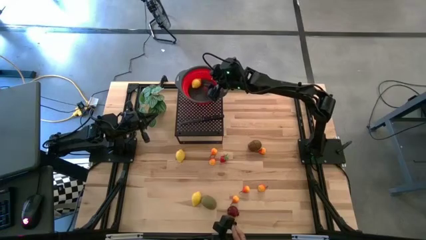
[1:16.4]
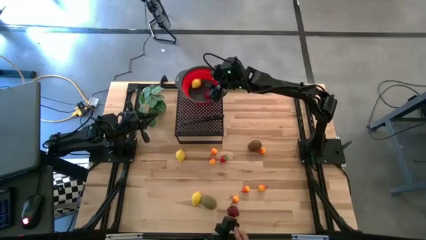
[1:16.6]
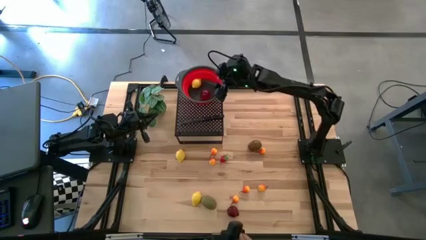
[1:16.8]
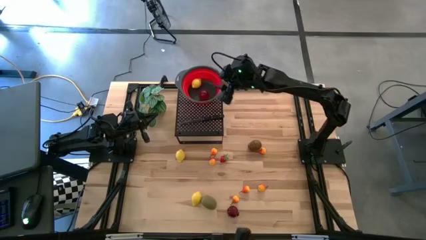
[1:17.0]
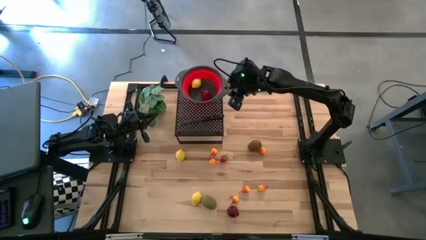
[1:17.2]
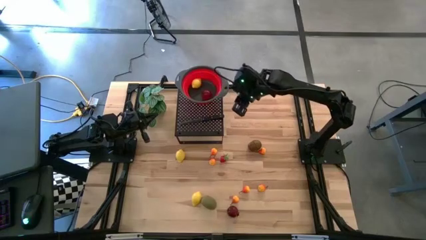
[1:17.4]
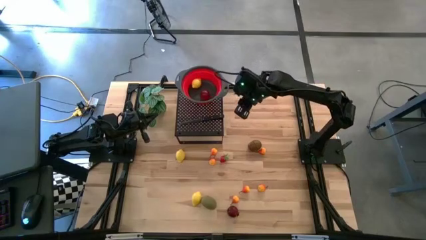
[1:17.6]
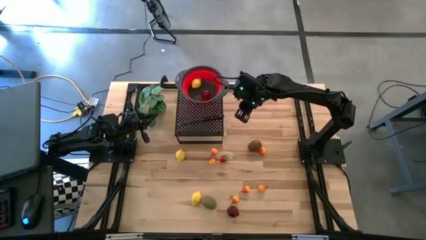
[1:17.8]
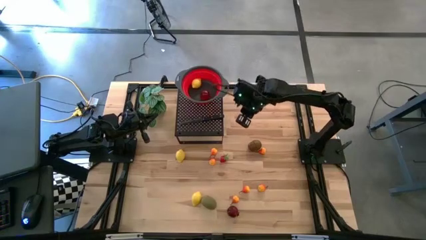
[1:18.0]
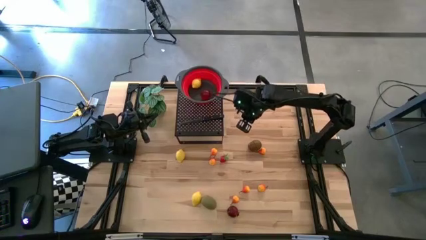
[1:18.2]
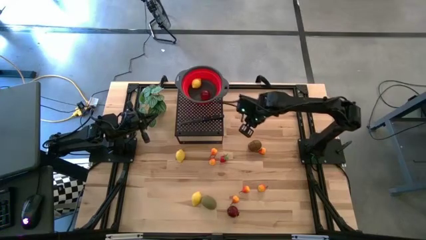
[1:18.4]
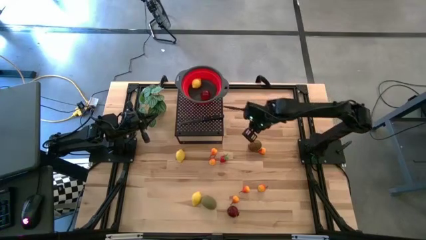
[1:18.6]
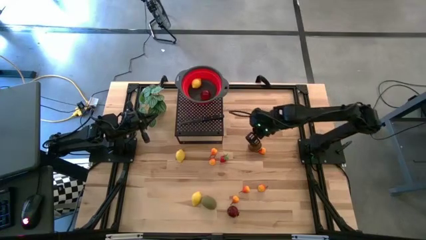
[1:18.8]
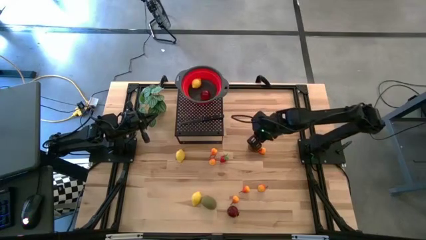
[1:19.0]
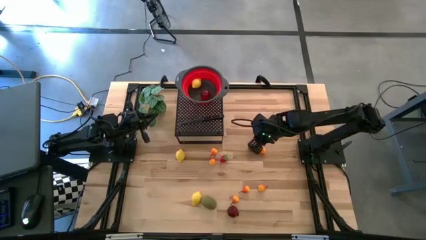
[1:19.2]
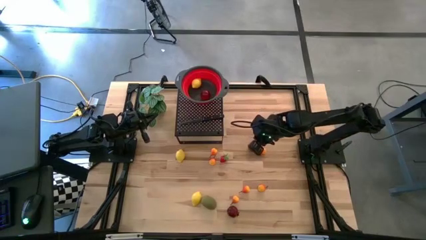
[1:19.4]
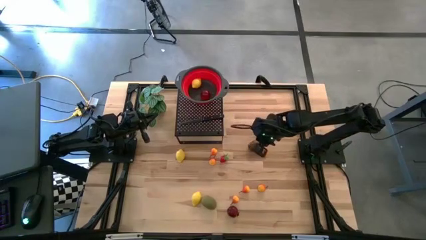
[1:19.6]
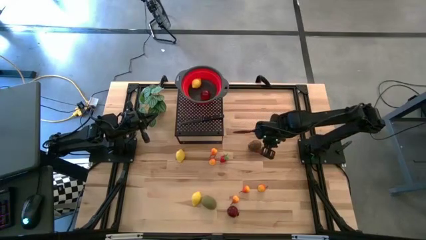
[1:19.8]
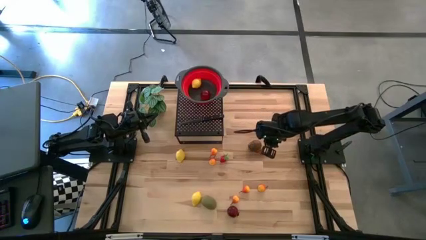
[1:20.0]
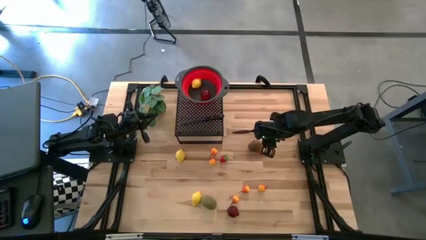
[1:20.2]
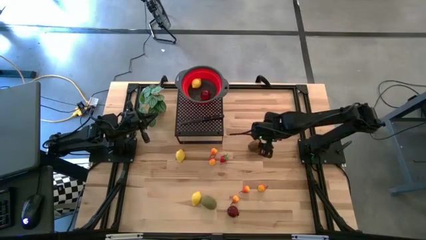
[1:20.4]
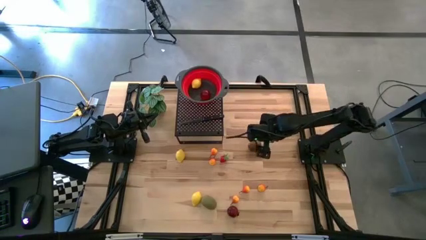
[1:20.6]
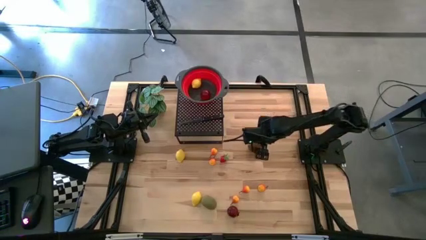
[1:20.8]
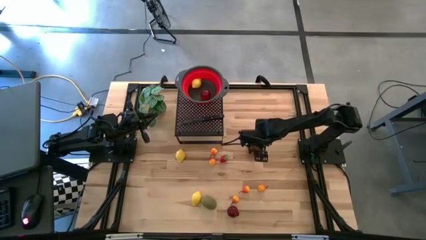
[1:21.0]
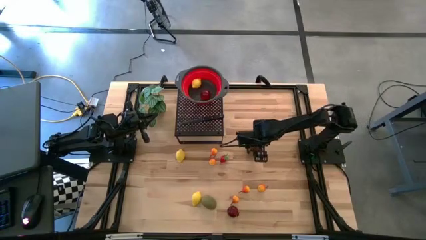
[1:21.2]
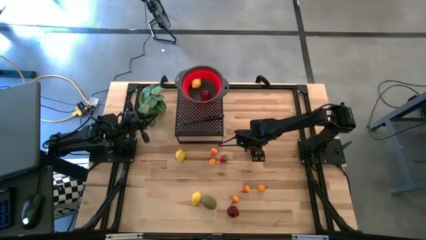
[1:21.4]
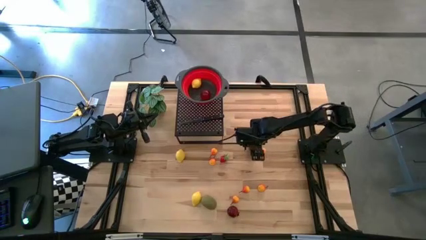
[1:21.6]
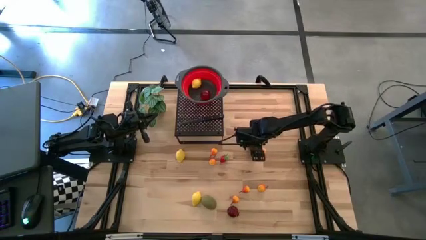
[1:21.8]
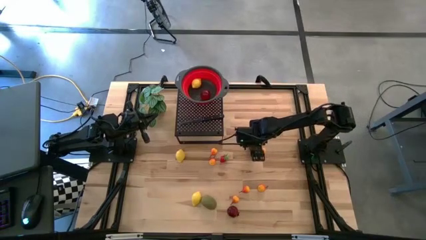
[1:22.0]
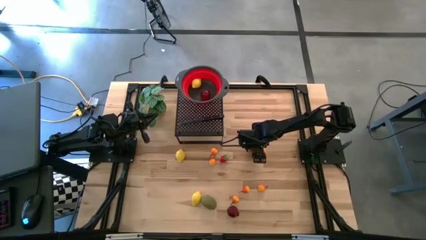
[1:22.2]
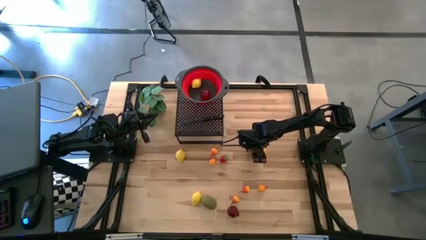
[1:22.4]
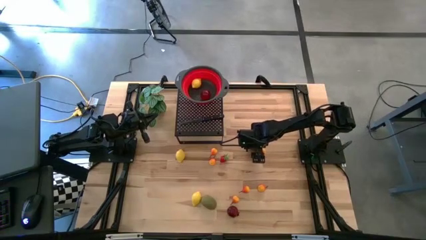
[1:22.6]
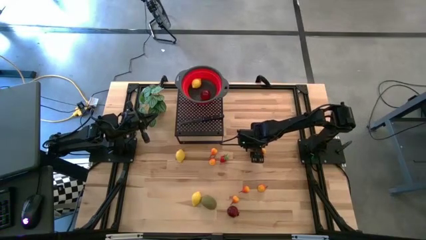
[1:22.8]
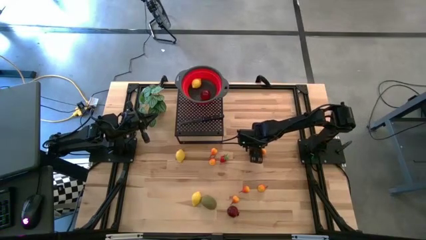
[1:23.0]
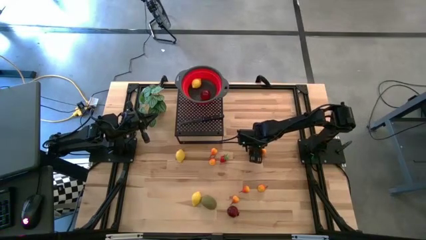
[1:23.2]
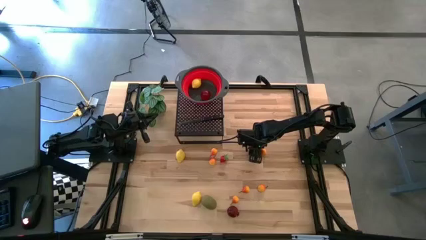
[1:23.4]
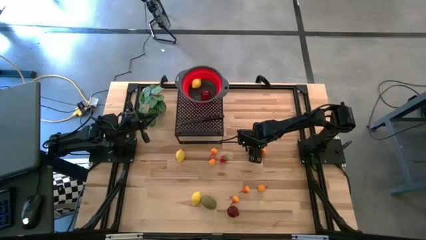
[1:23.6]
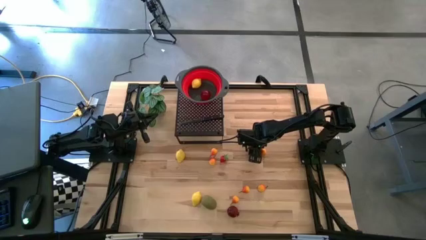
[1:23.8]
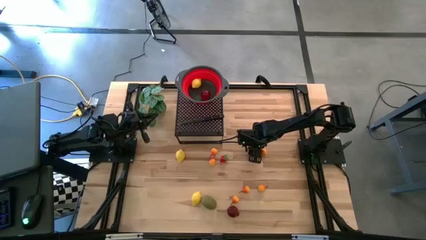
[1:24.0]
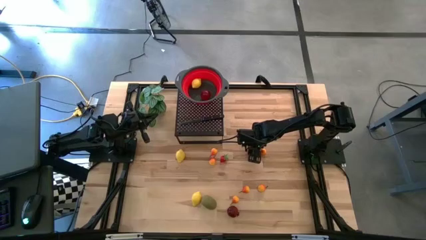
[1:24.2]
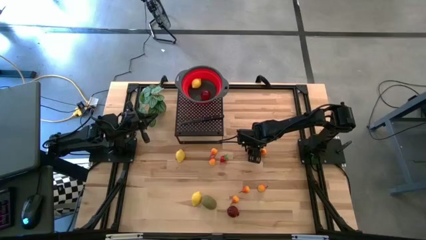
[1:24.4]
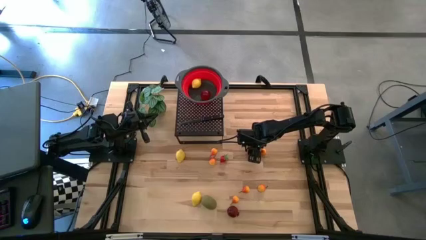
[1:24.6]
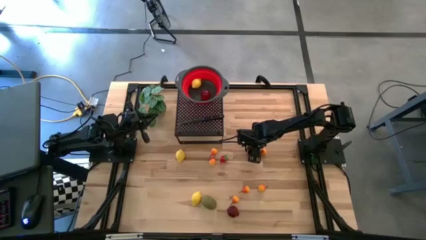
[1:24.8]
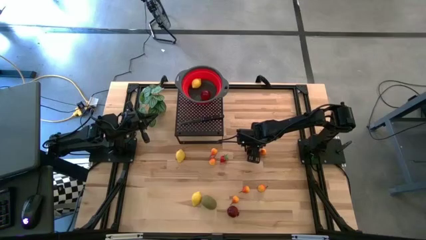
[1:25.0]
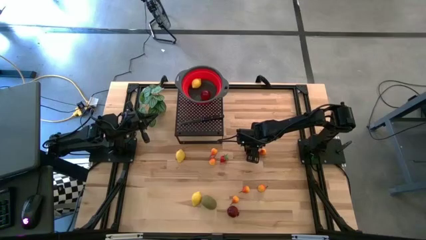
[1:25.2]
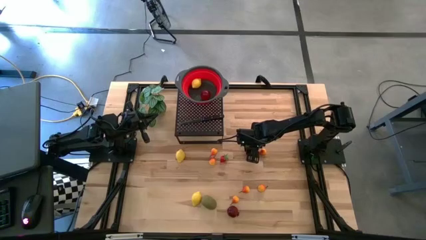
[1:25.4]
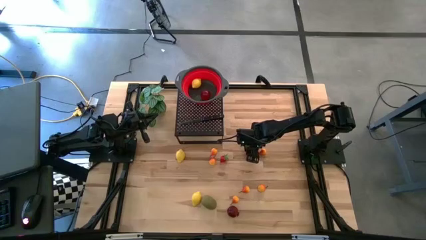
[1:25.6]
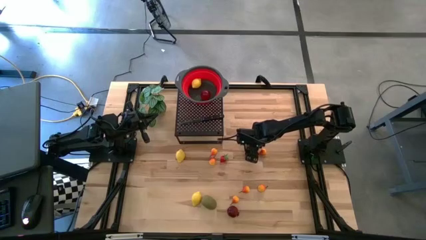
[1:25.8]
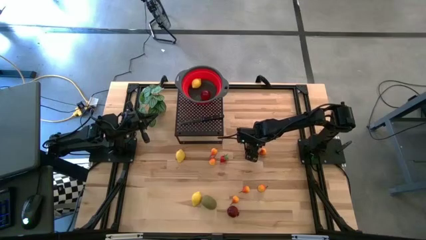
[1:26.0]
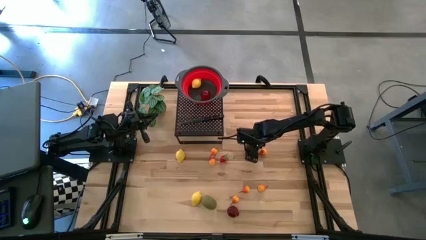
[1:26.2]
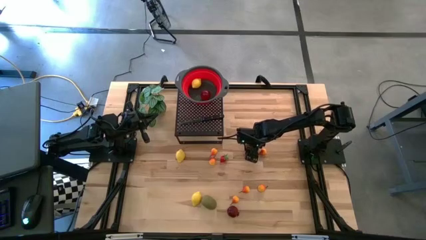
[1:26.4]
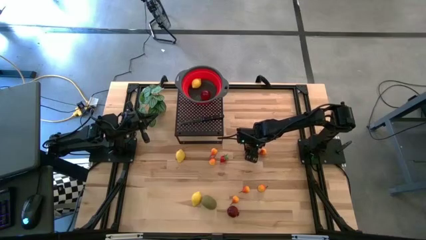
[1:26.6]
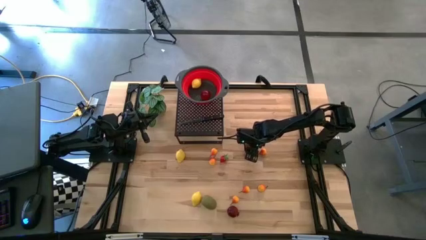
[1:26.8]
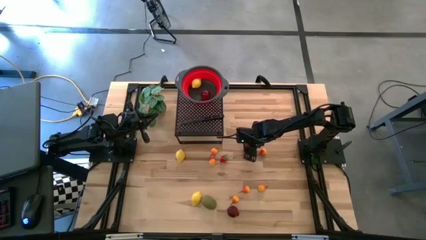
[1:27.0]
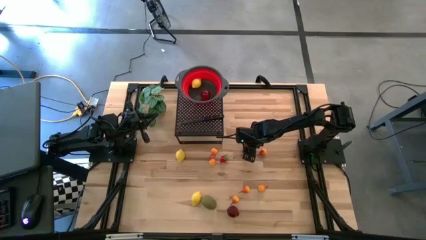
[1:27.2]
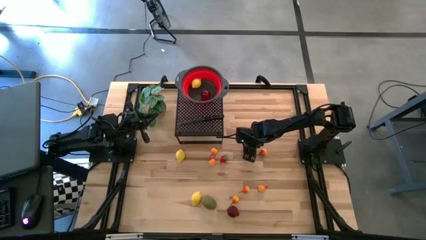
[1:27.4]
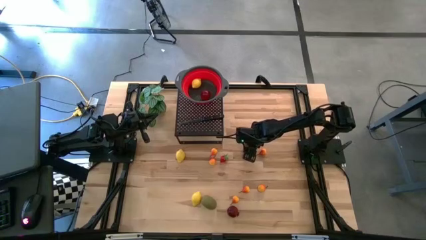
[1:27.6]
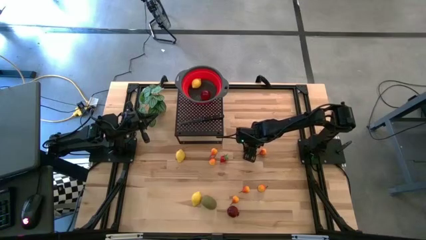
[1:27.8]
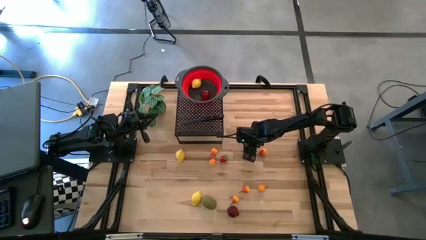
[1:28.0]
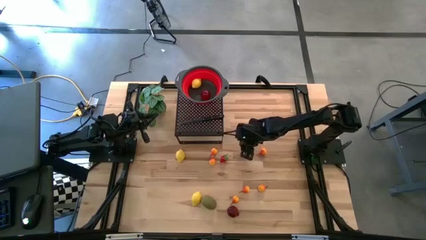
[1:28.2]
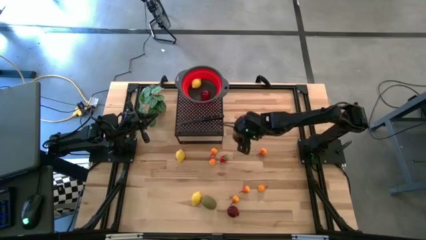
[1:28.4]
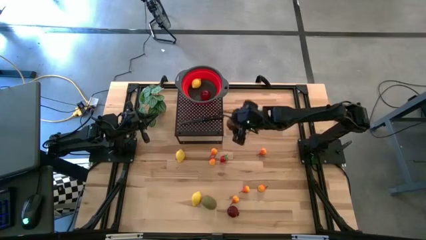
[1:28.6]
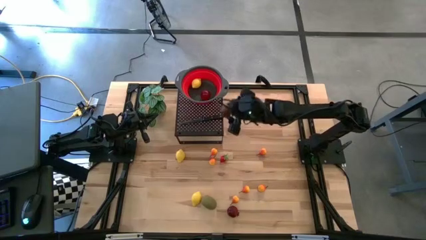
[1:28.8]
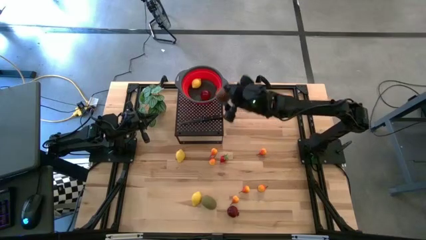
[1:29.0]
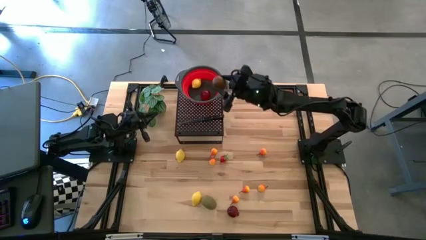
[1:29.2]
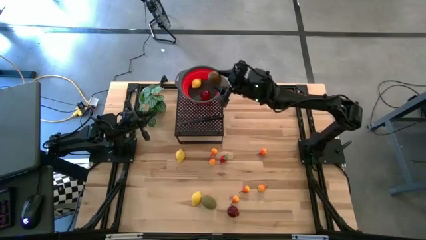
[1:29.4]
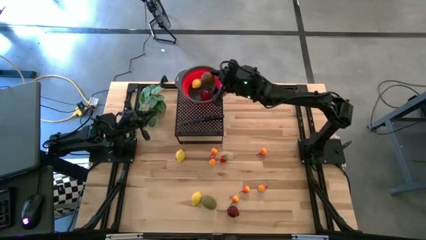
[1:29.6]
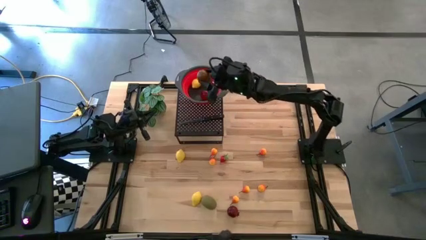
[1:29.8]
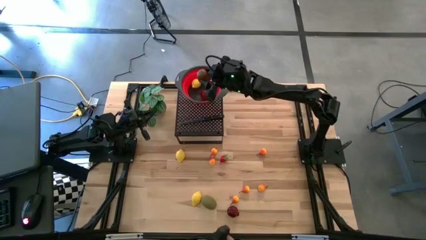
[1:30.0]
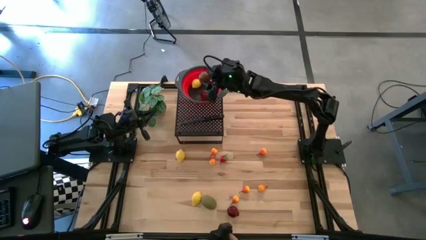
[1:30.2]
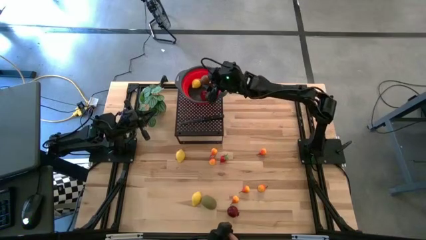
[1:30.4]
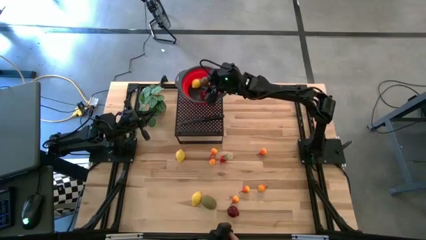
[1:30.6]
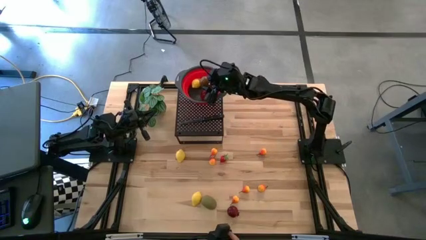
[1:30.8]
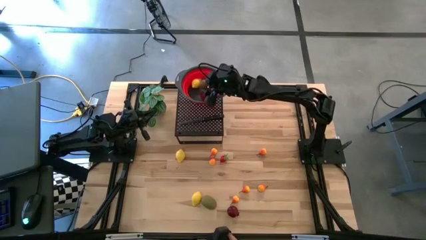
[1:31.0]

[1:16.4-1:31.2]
Task: Pick & Place Fruit
Put the top kiwi into the red strainer bowl

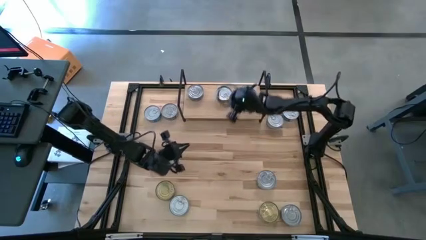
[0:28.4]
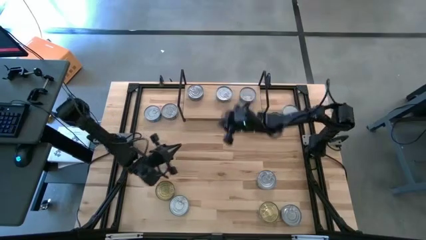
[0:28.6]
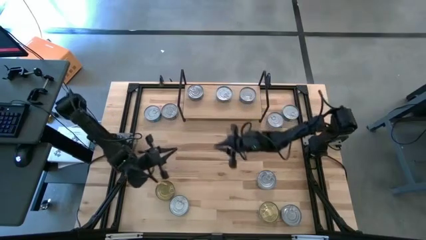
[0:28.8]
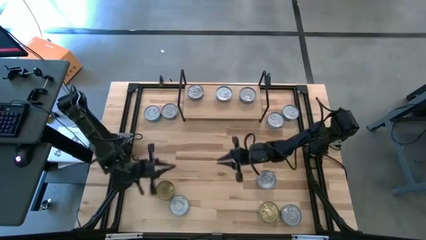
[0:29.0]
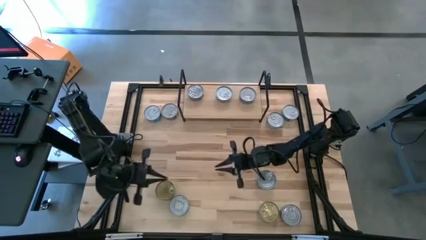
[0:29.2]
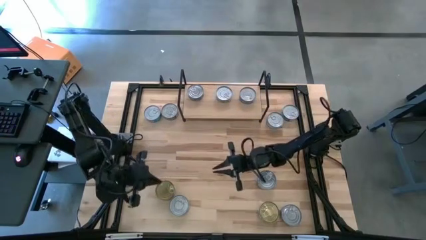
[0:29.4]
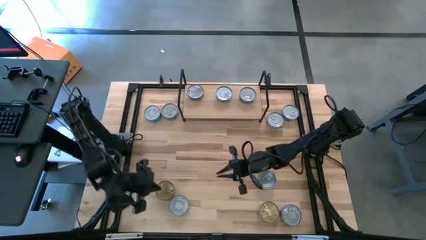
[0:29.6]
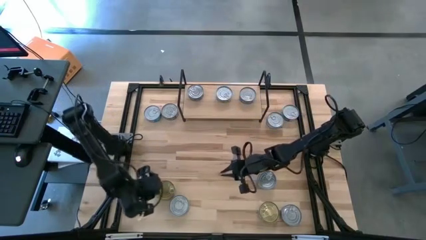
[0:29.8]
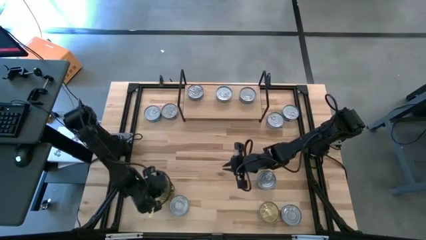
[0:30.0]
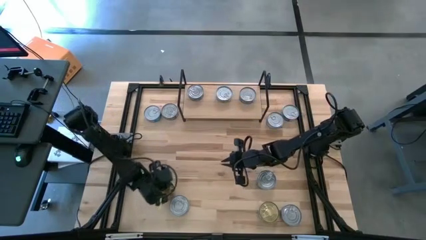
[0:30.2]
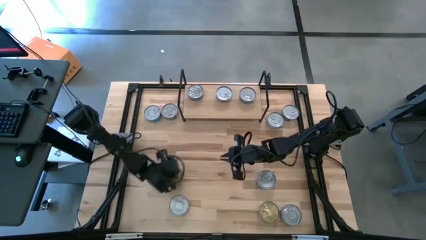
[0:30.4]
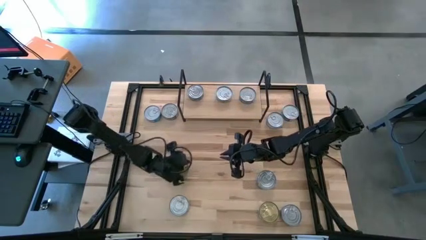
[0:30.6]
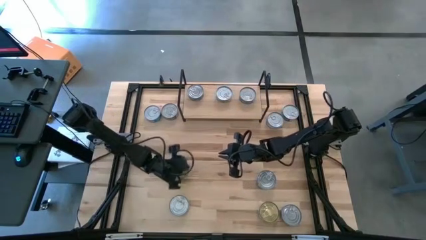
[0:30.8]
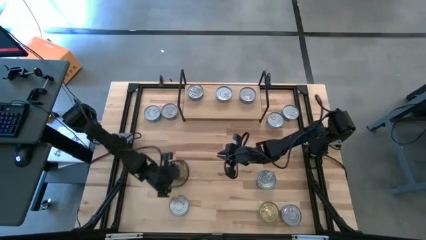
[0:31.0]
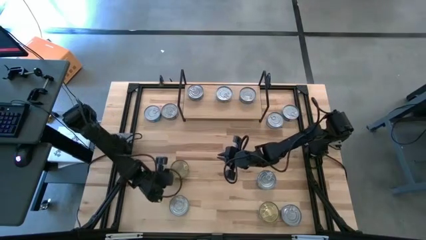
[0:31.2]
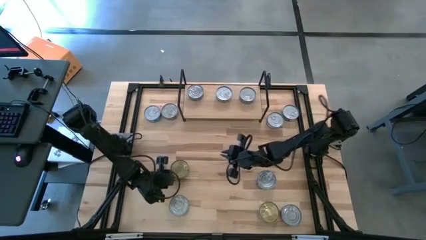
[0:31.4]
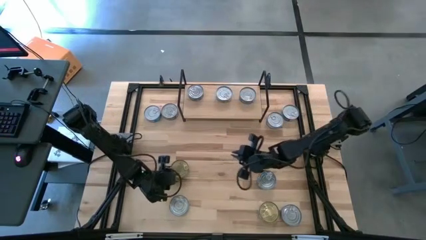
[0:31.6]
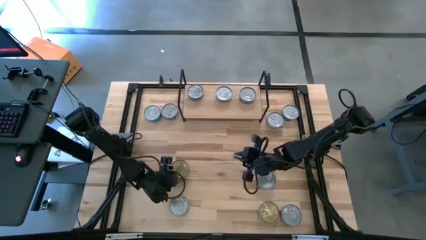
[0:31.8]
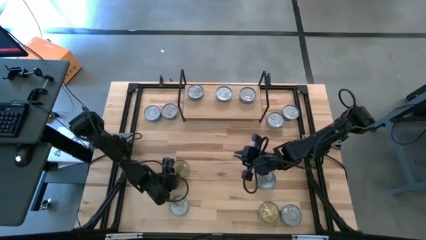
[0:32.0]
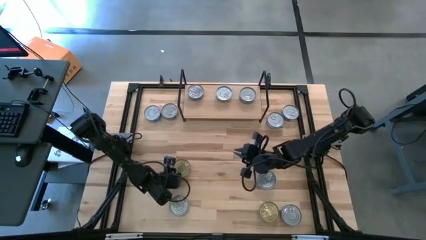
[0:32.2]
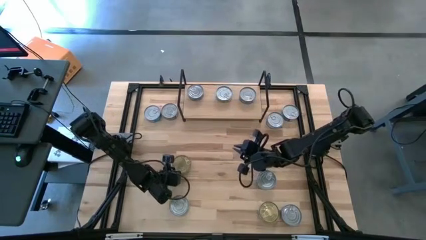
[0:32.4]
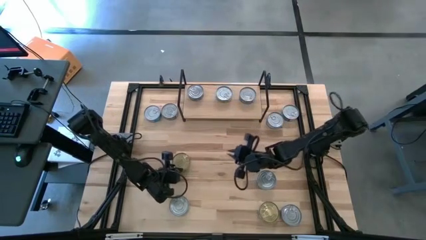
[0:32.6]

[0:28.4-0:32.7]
Task: Stack canned seafood by type on shelf
Stack the green tuna can on top of the other green tuna can on the shelf
